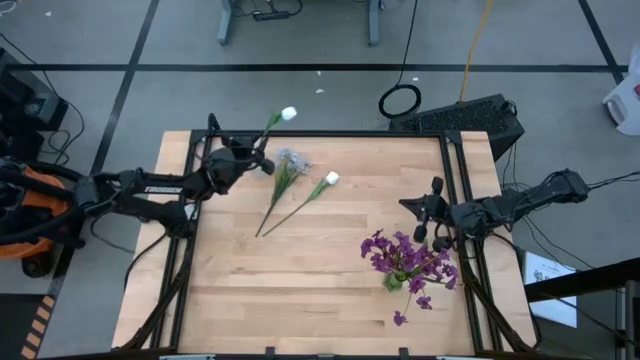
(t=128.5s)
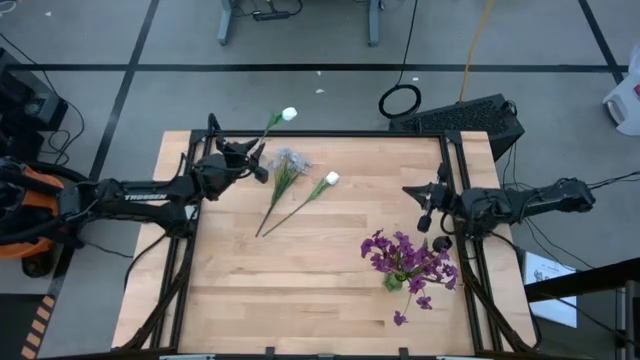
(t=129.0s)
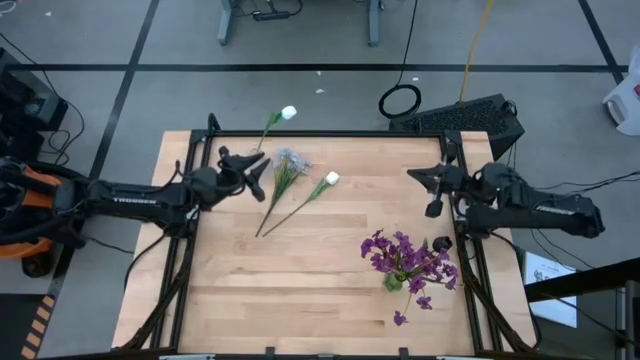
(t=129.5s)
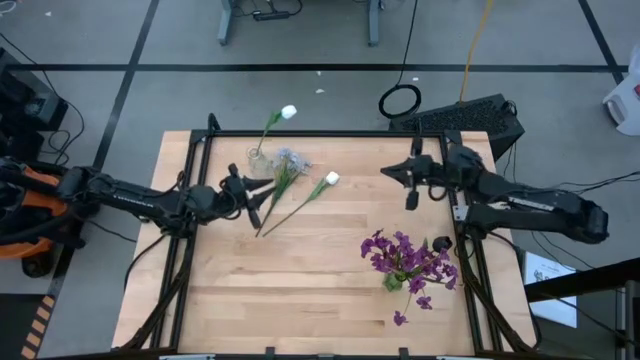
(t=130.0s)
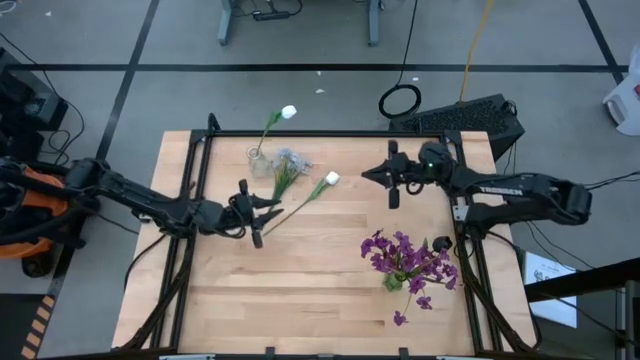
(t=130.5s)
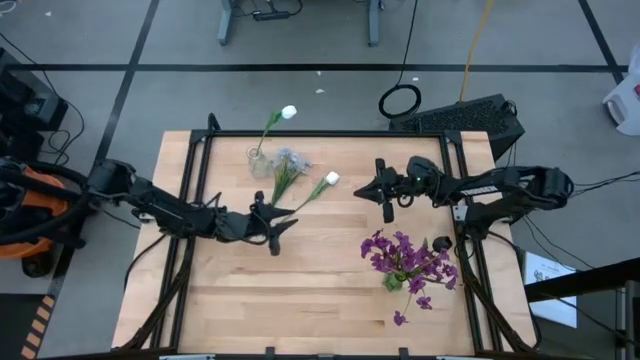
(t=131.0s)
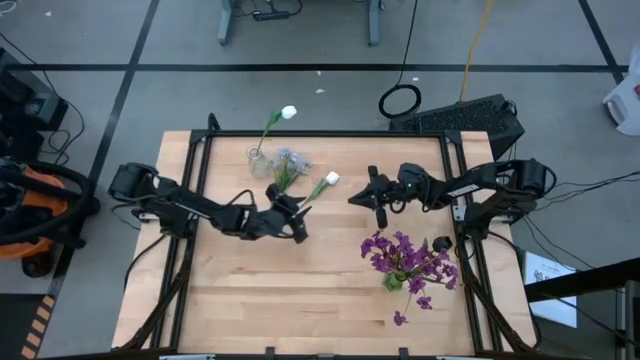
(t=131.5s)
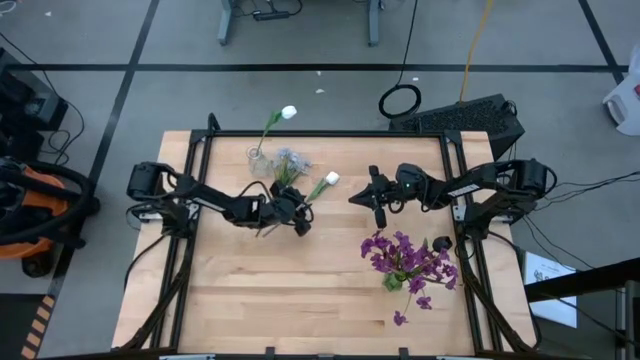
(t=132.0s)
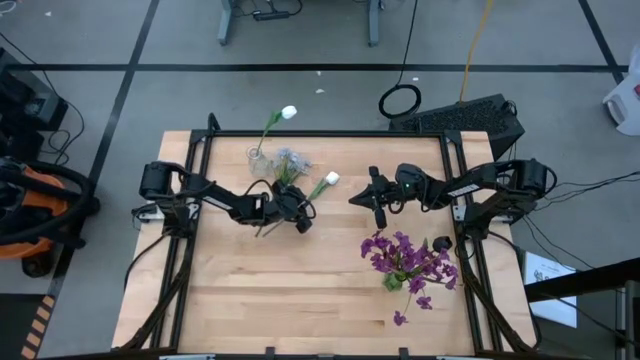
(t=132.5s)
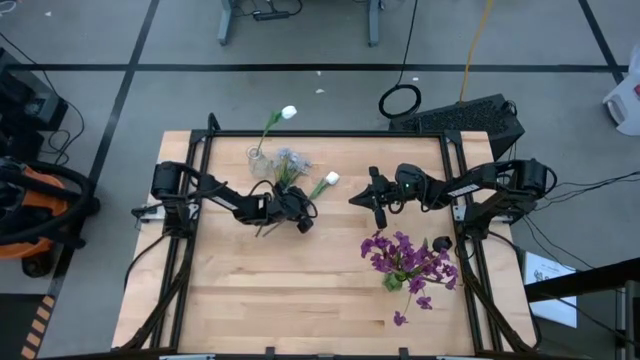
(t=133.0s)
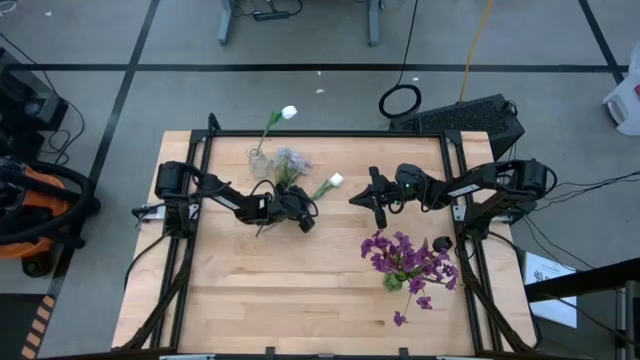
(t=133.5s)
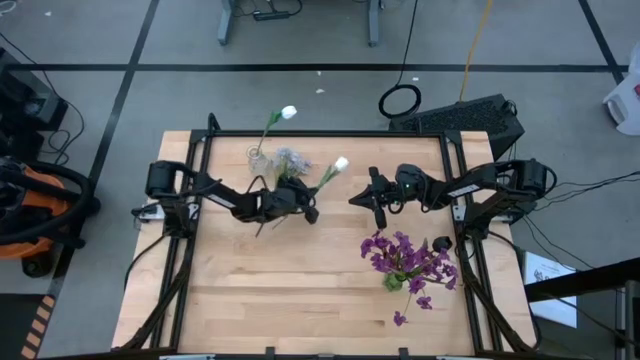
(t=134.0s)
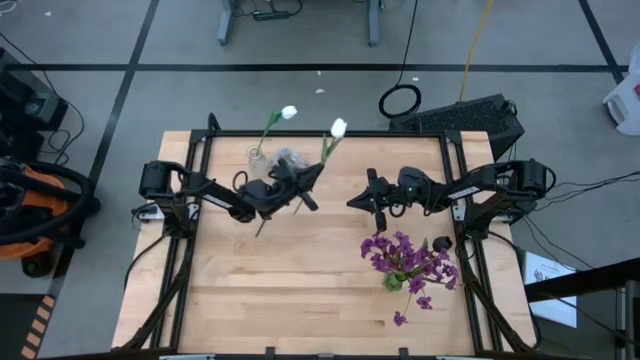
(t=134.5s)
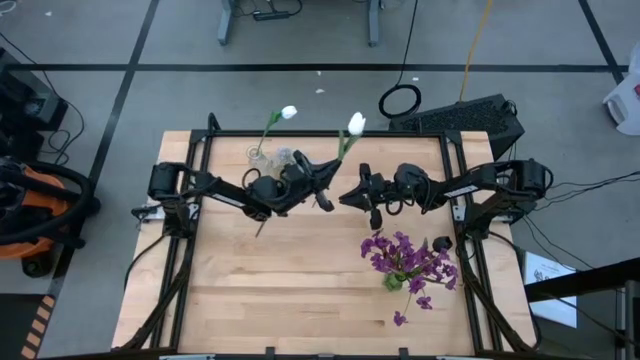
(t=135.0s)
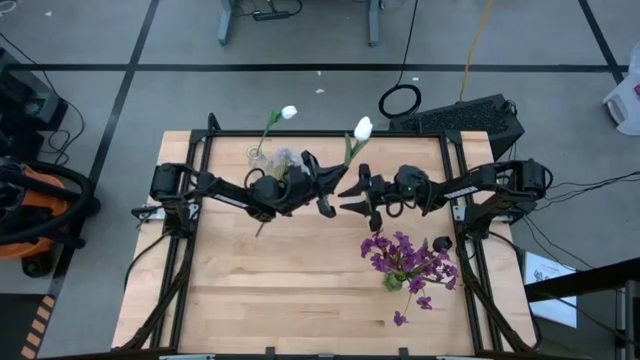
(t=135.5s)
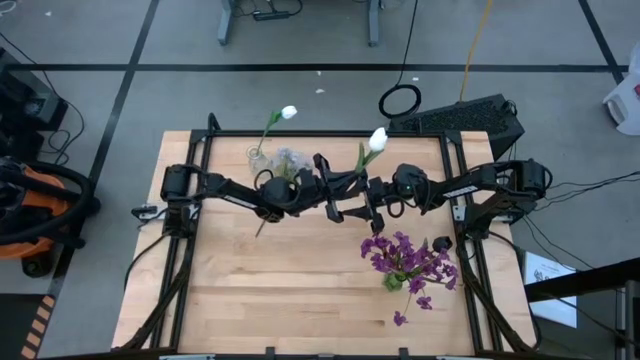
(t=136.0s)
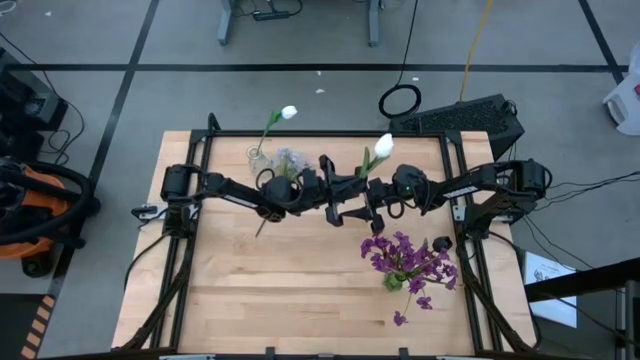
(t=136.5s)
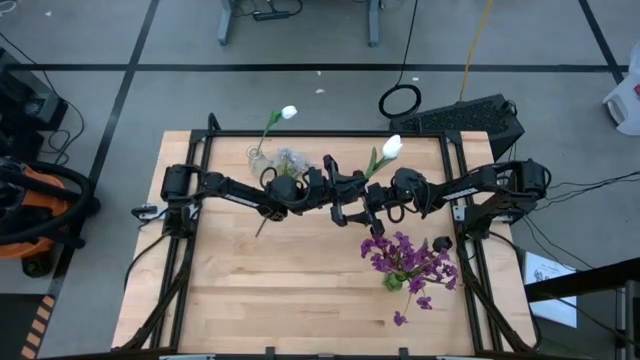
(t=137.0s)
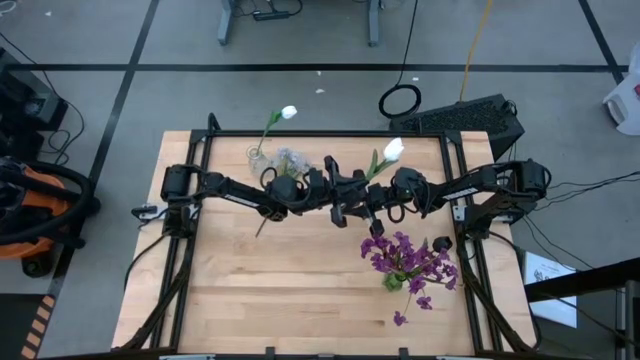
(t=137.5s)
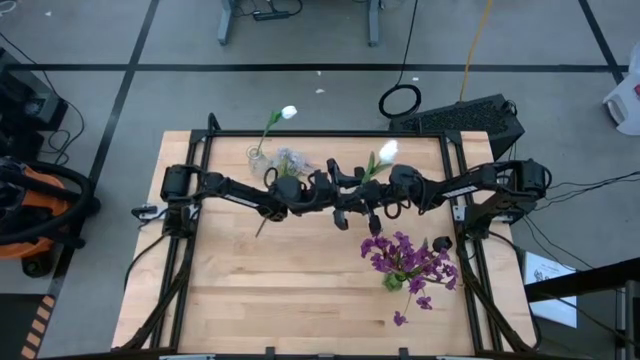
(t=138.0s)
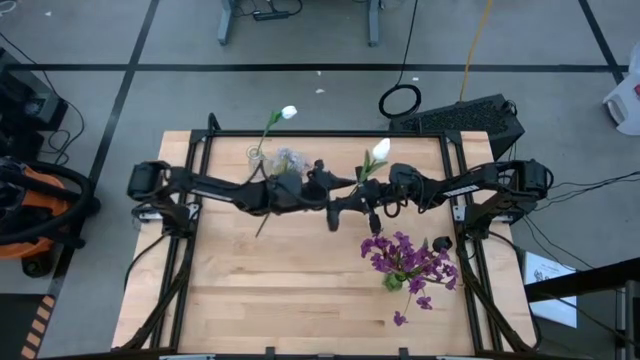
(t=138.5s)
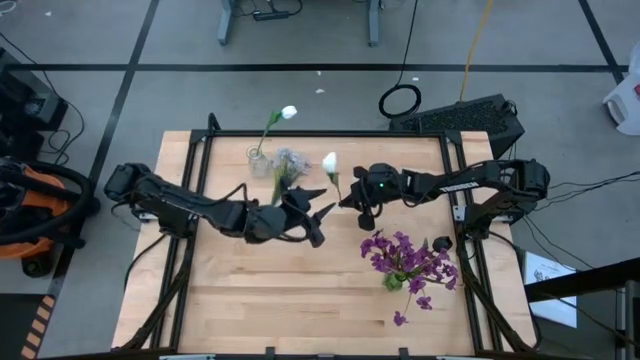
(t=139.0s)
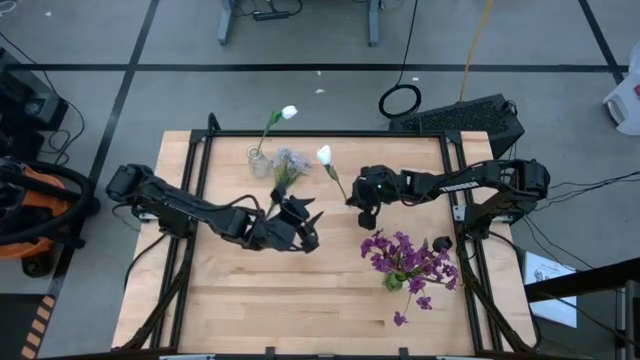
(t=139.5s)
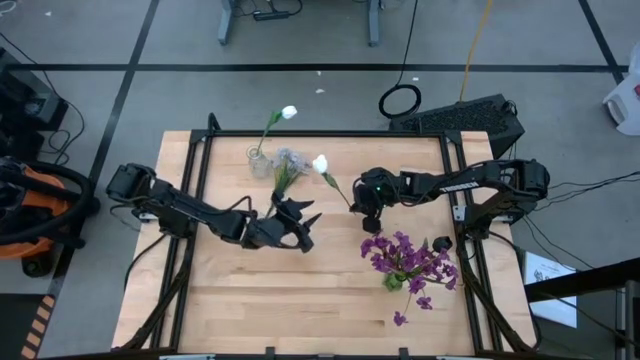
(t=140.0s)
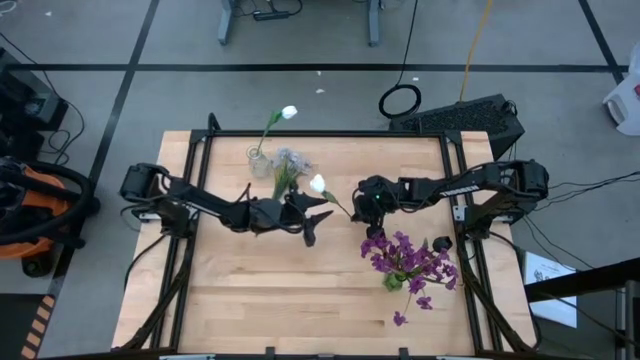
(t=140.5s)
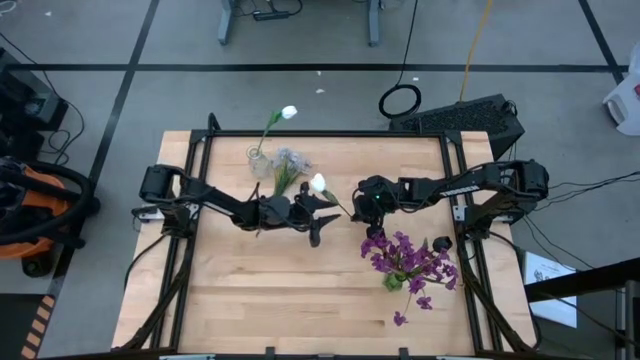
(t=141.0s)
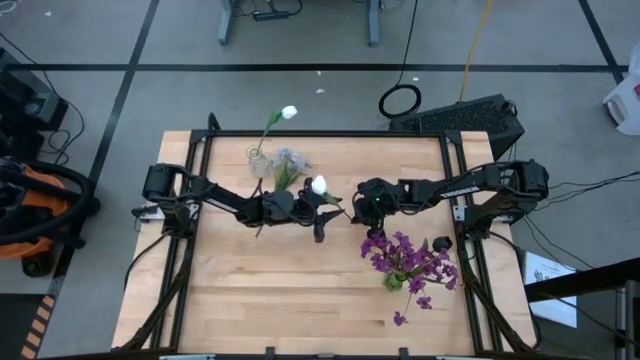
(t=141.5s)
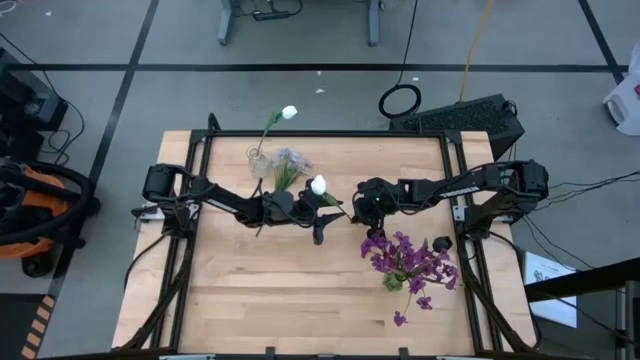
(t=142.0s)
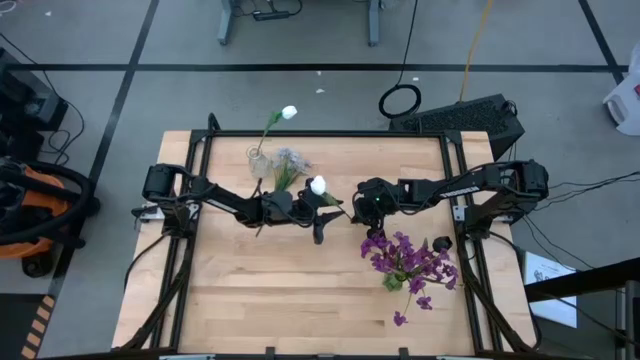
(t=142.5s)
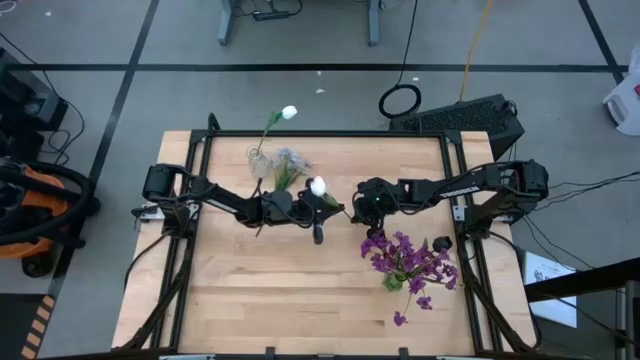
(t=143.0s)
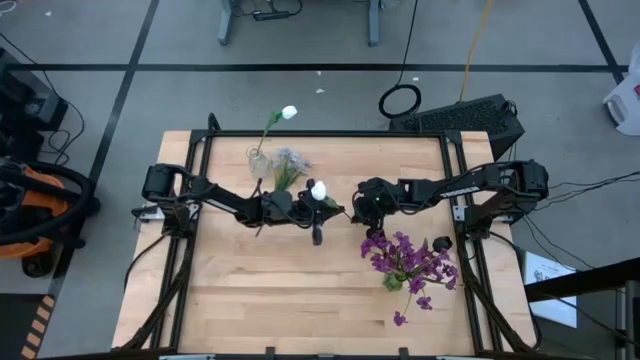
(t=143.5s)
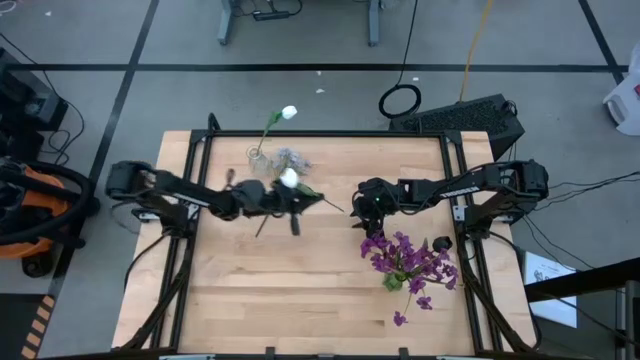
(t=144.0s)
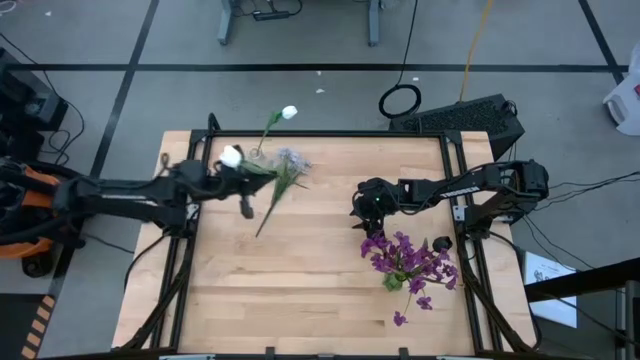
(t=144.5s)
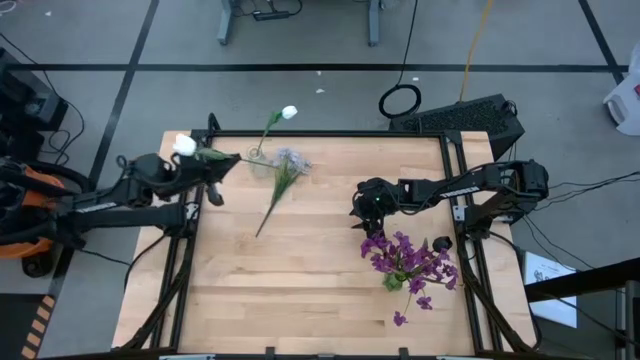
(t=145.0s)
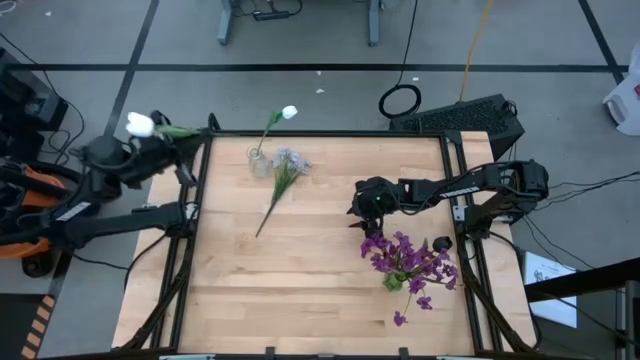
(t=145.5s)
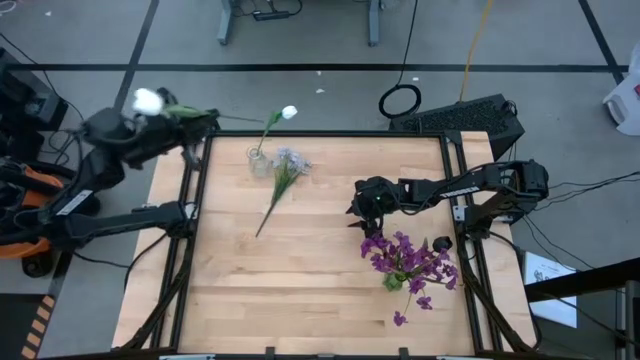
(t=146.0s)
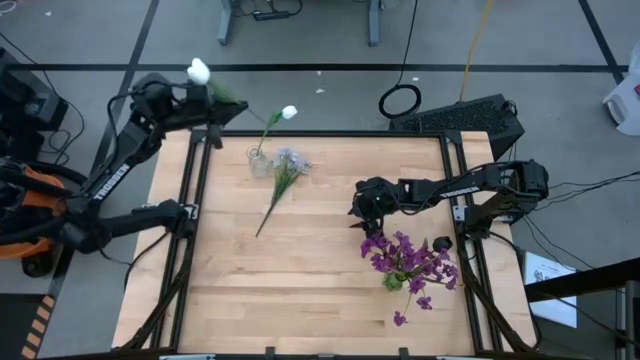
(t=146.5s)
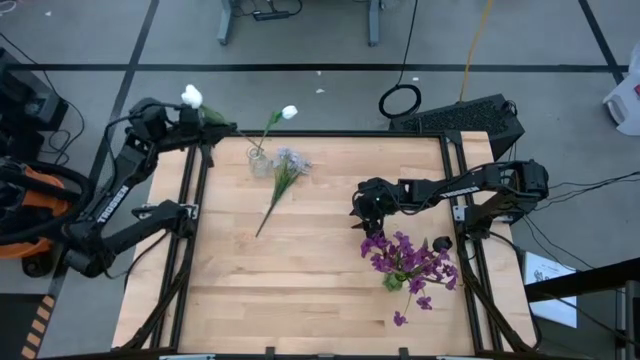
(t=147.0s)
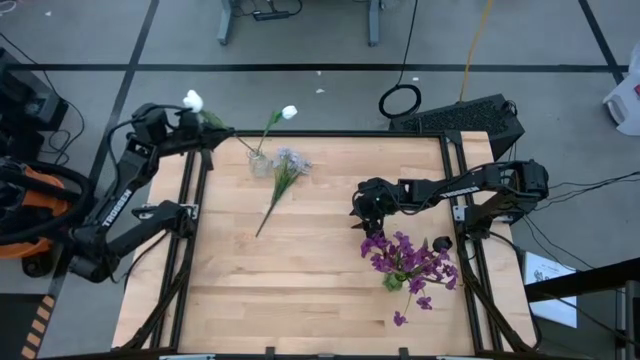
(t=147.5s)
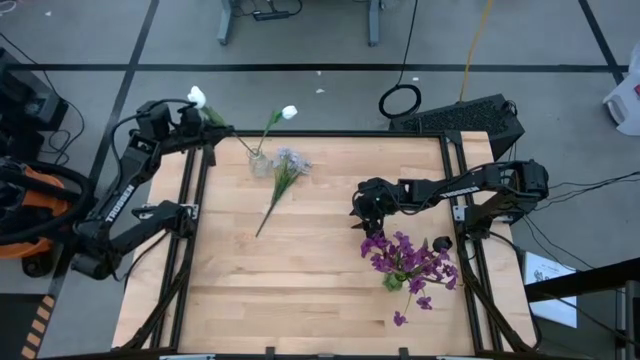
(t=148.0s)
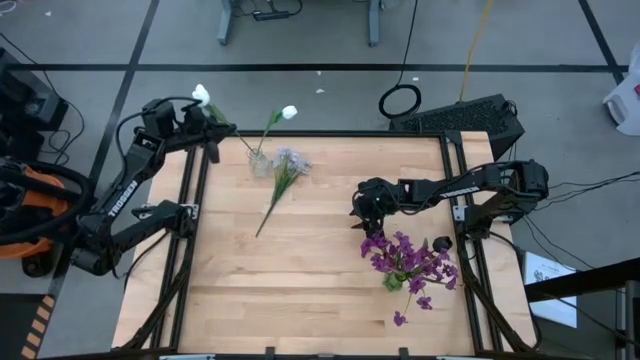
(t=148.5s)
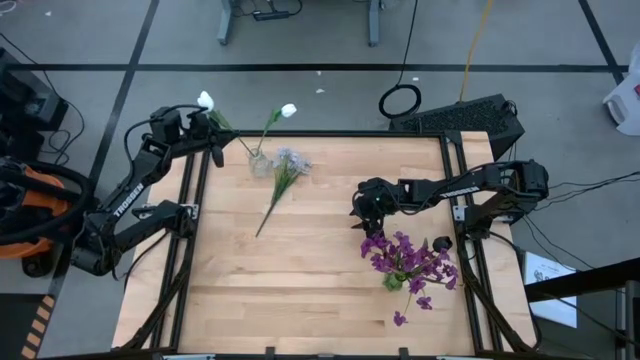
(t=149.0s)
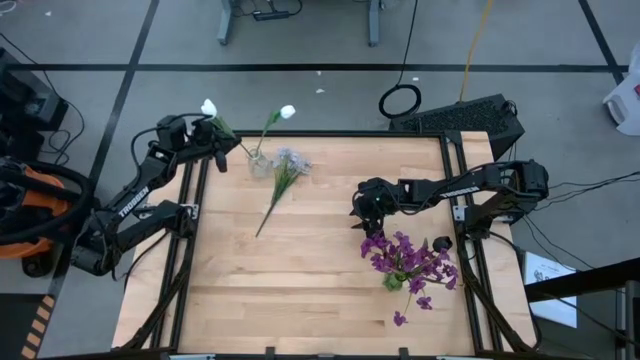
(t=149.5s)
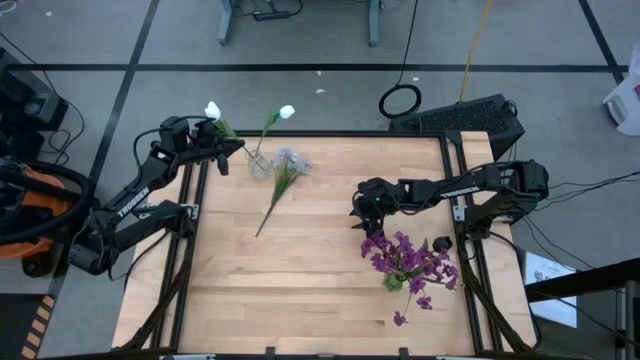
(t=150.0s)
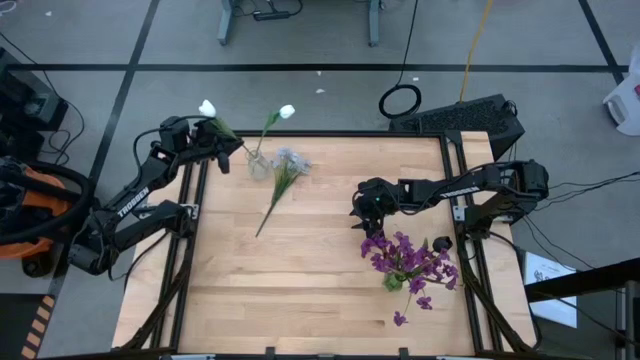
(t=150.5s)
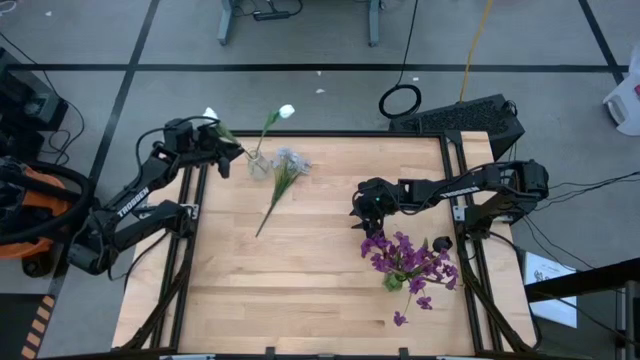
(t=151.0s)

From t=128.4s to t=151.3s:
Task: Sort flowers into vase by color
Put the white tulip into the transparent vase
